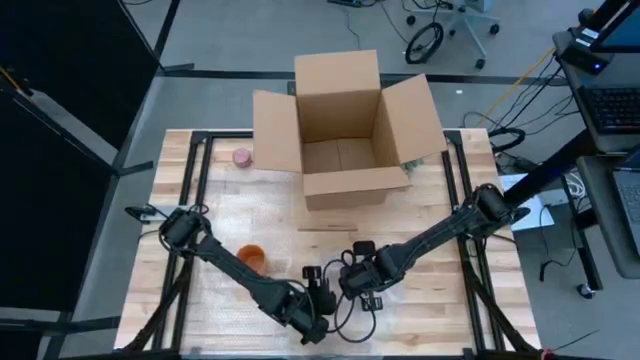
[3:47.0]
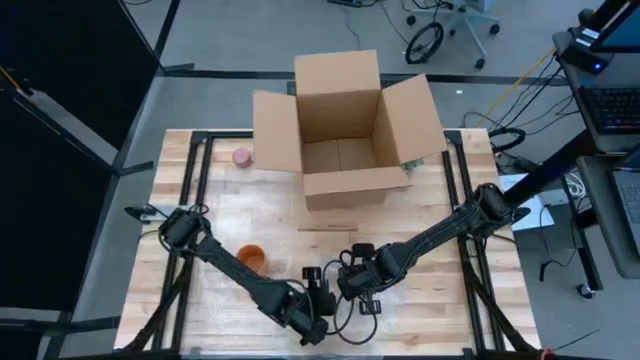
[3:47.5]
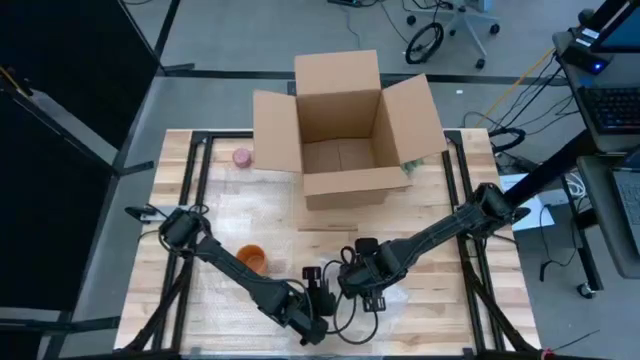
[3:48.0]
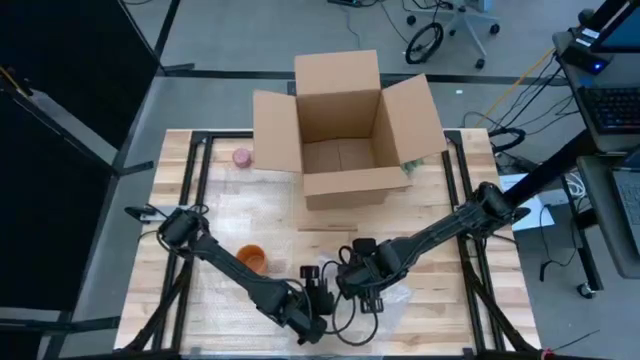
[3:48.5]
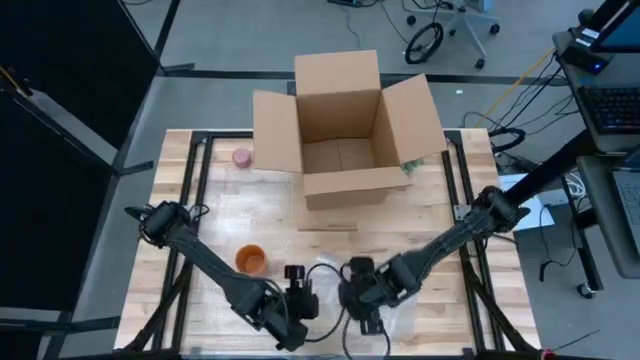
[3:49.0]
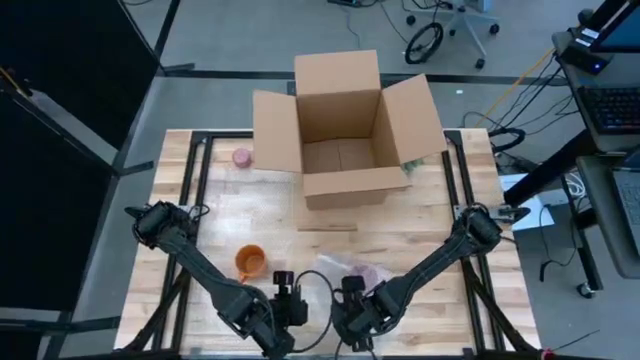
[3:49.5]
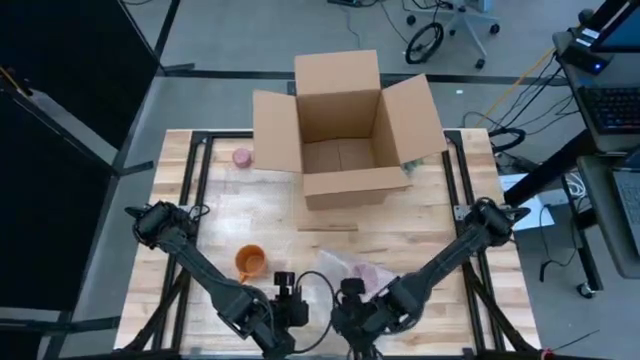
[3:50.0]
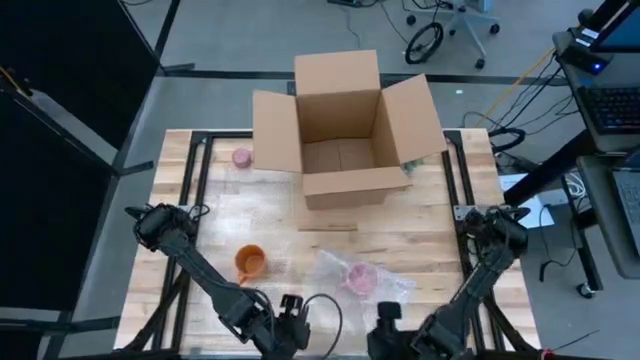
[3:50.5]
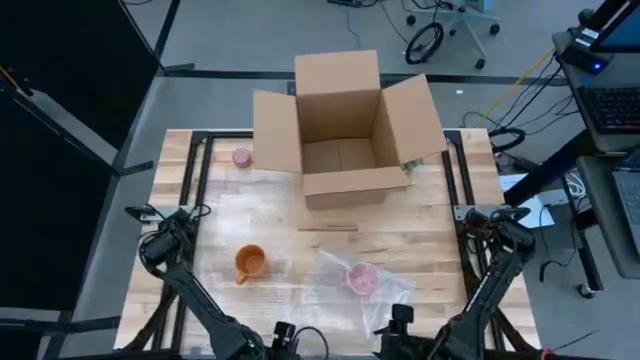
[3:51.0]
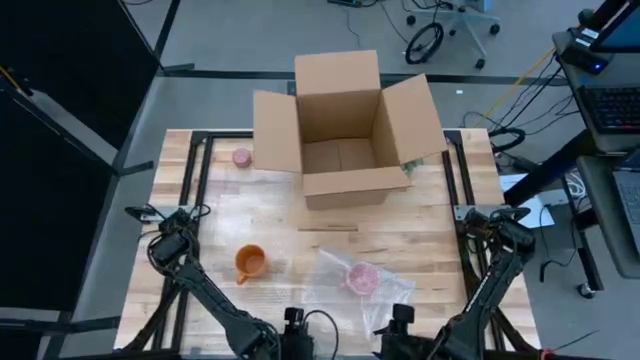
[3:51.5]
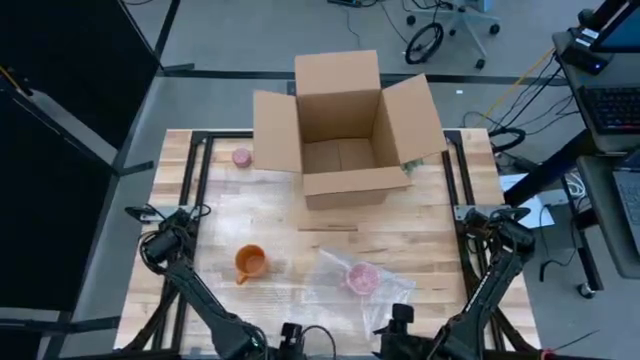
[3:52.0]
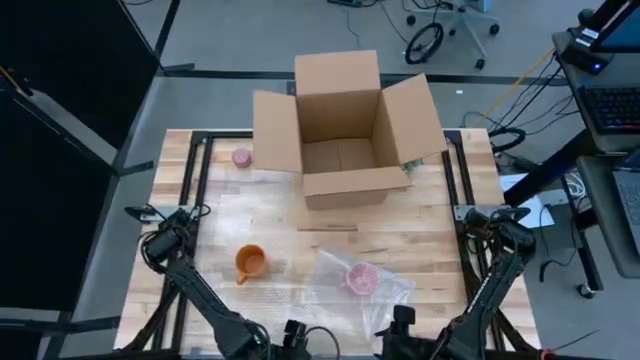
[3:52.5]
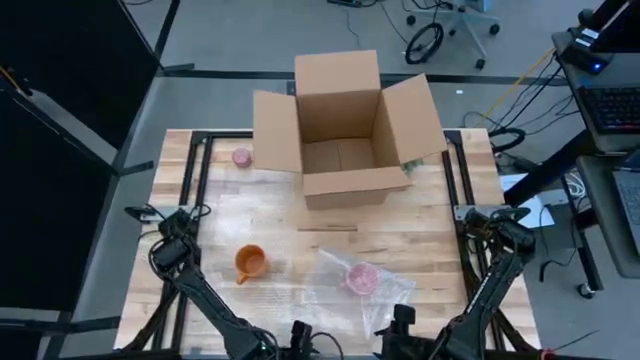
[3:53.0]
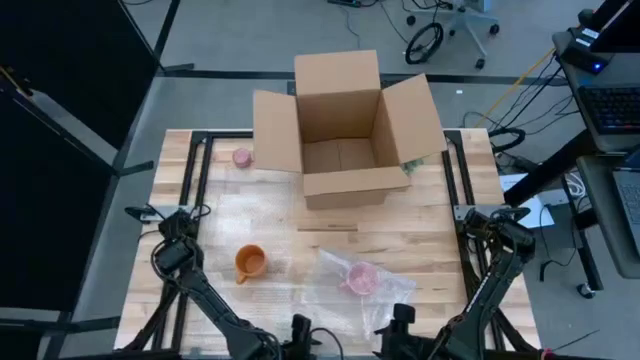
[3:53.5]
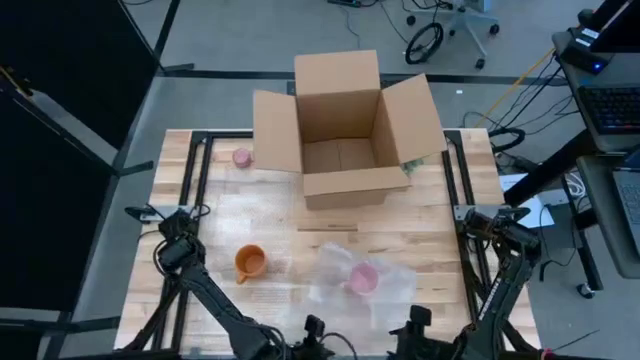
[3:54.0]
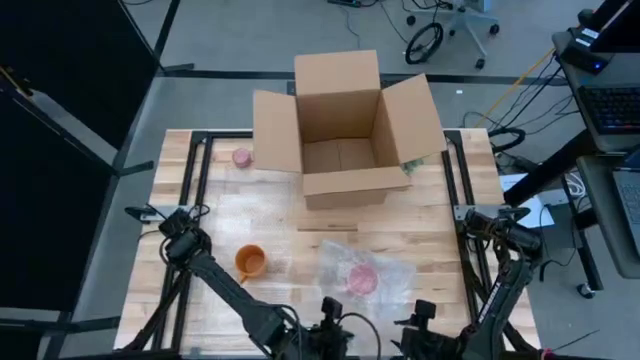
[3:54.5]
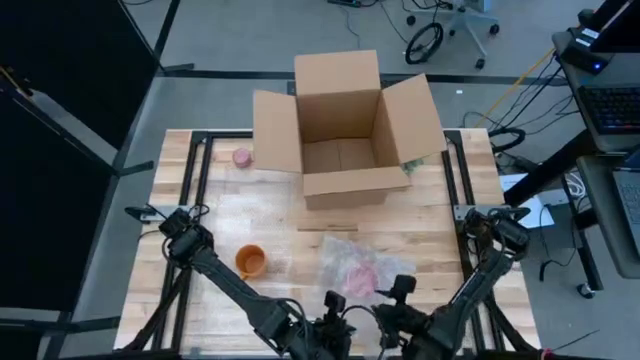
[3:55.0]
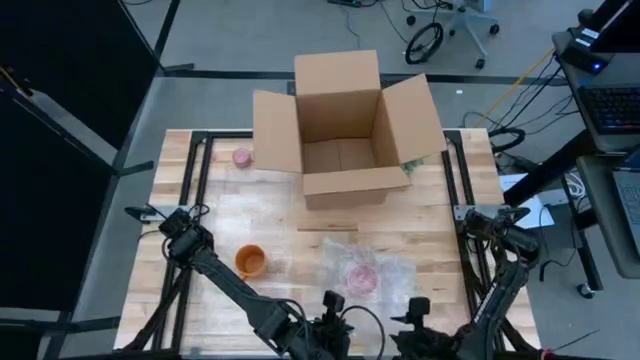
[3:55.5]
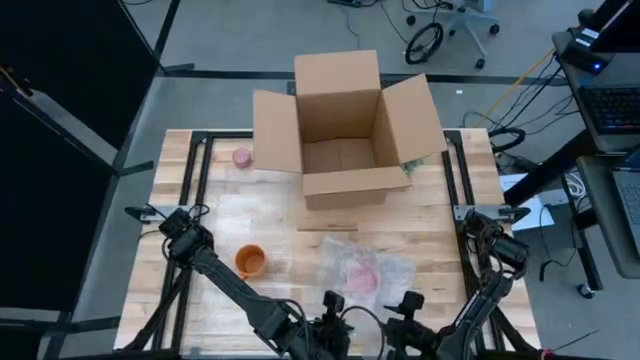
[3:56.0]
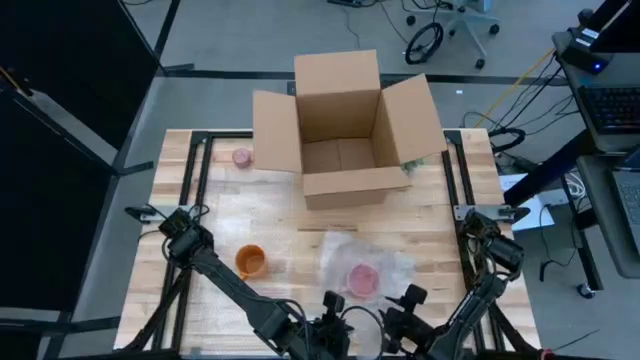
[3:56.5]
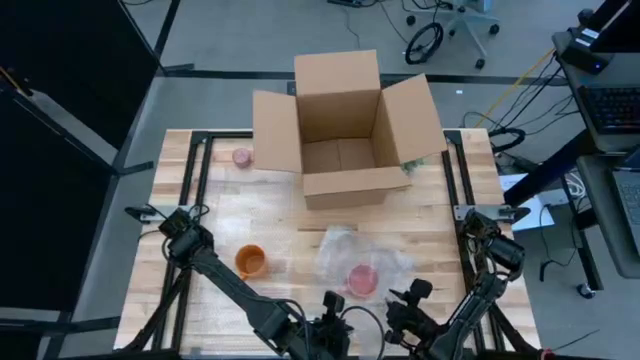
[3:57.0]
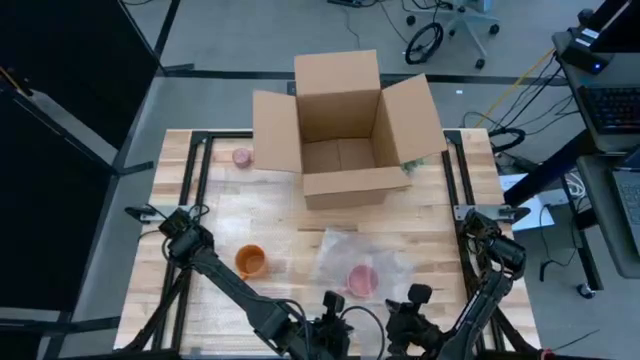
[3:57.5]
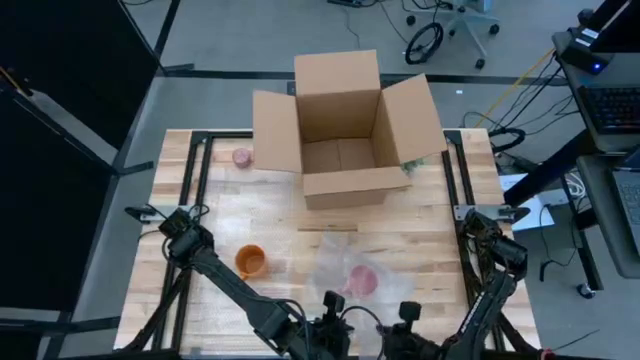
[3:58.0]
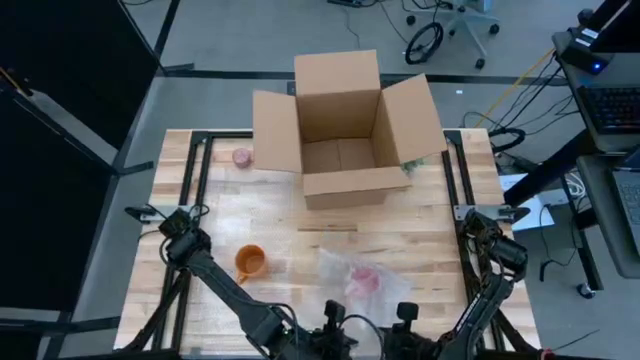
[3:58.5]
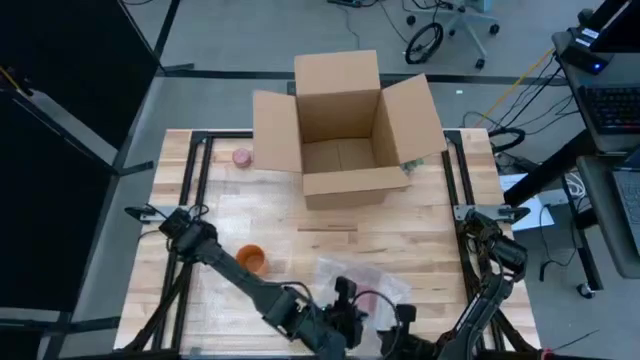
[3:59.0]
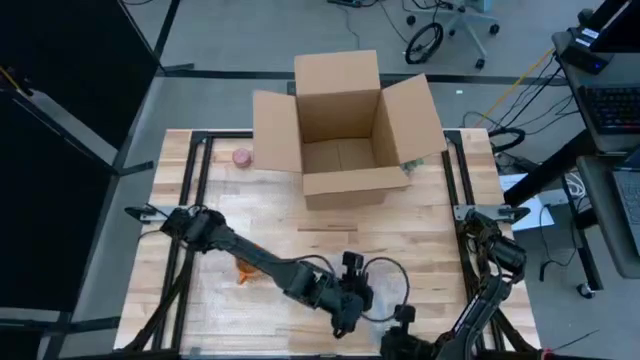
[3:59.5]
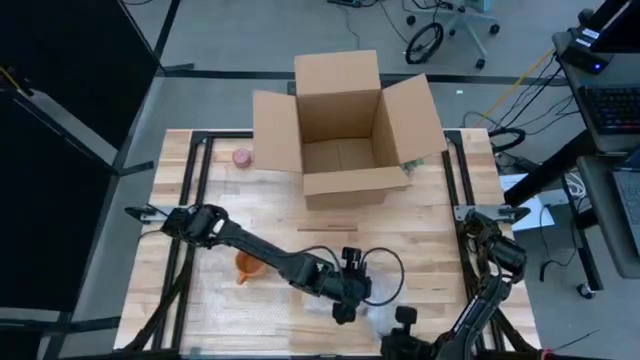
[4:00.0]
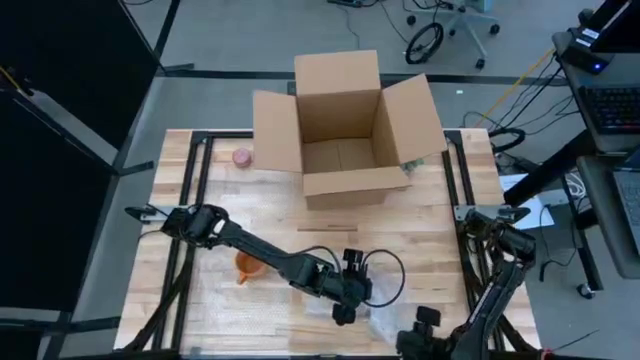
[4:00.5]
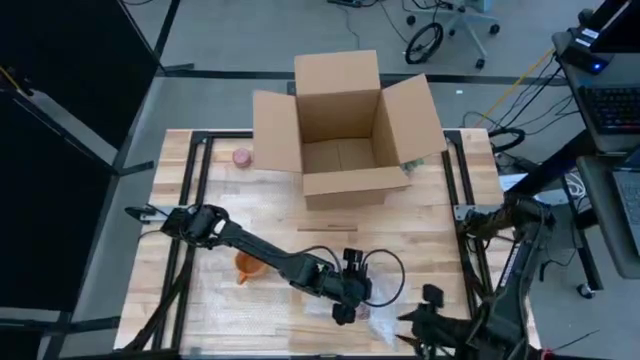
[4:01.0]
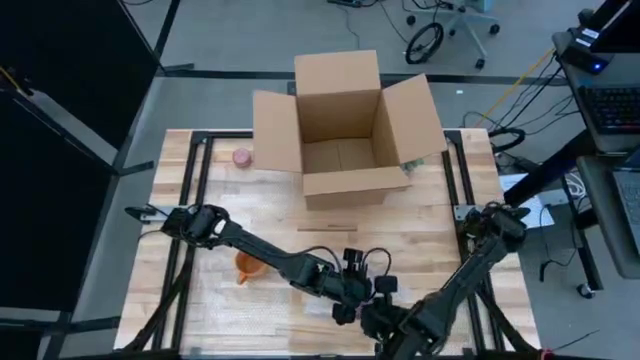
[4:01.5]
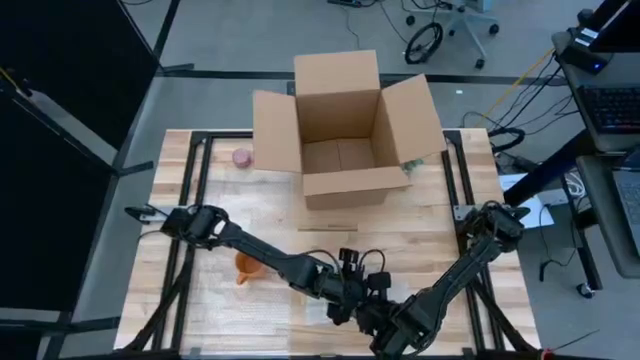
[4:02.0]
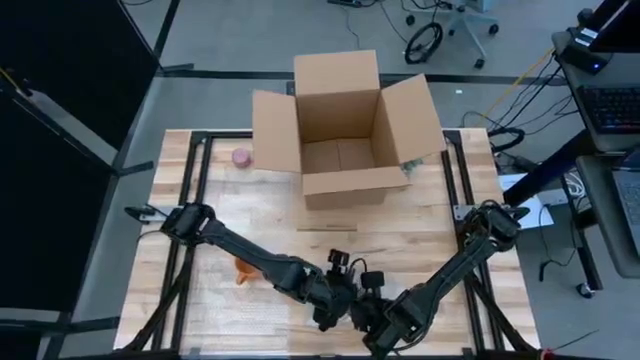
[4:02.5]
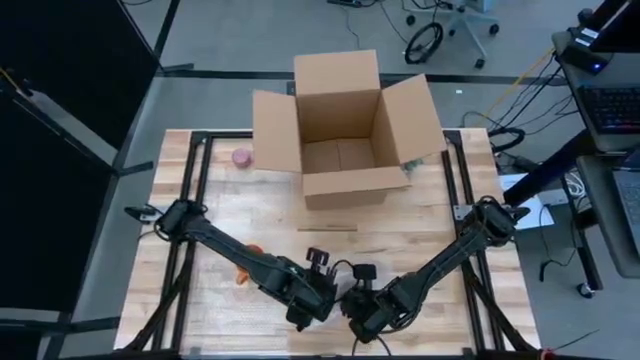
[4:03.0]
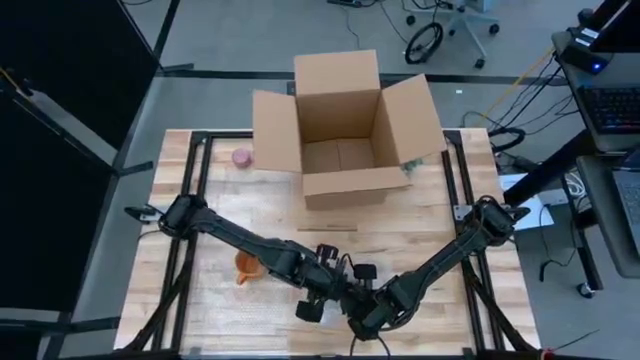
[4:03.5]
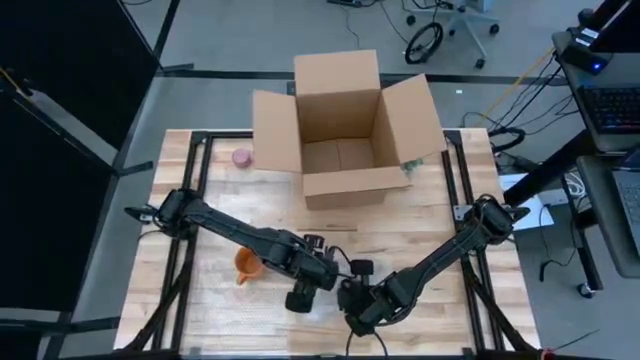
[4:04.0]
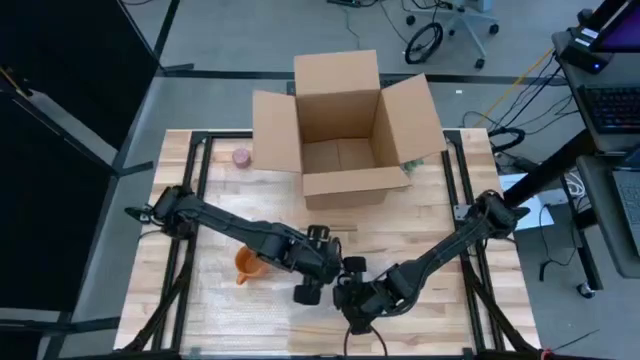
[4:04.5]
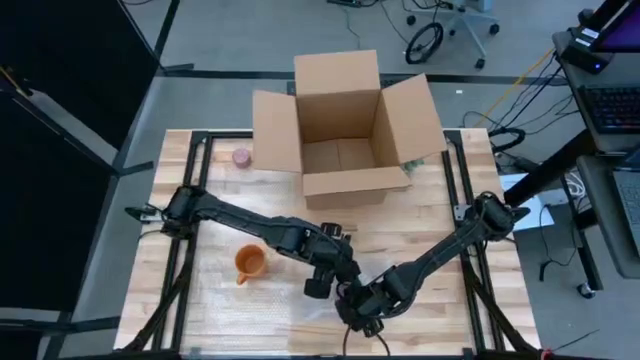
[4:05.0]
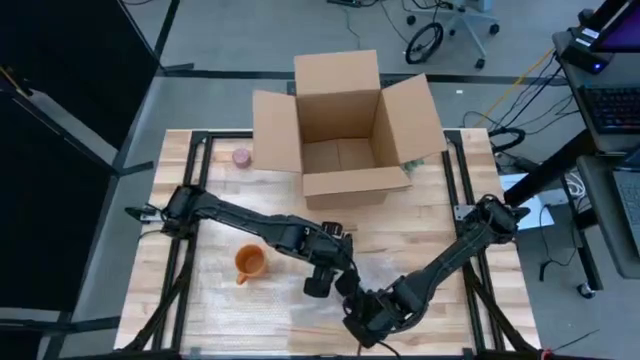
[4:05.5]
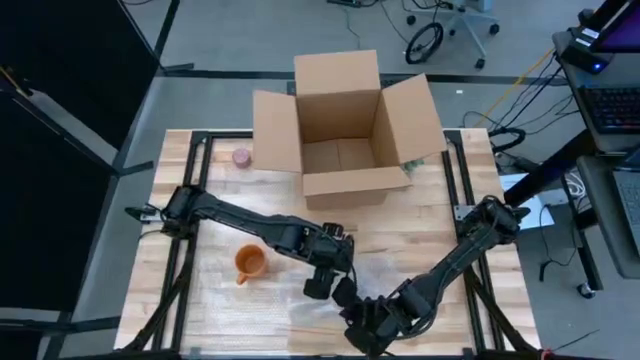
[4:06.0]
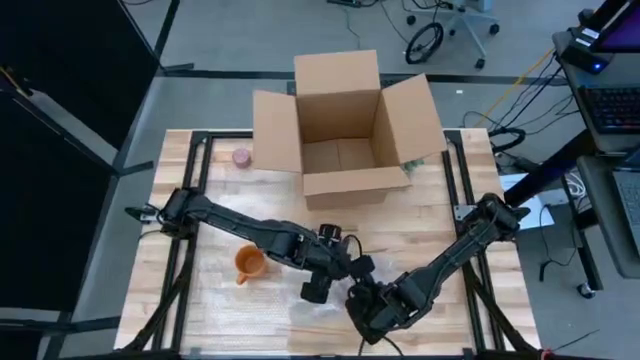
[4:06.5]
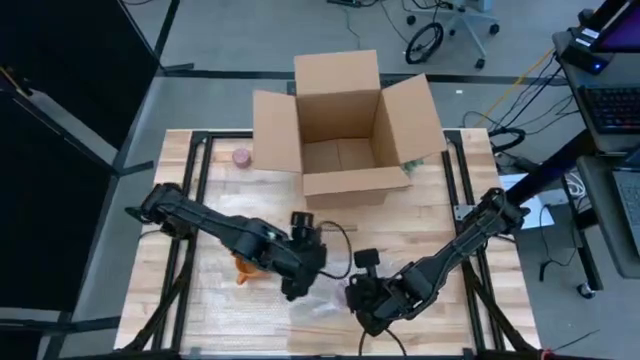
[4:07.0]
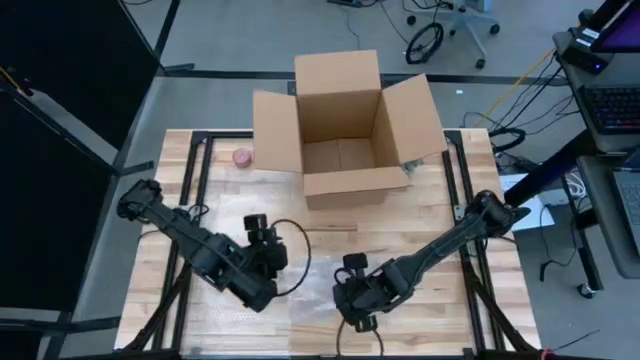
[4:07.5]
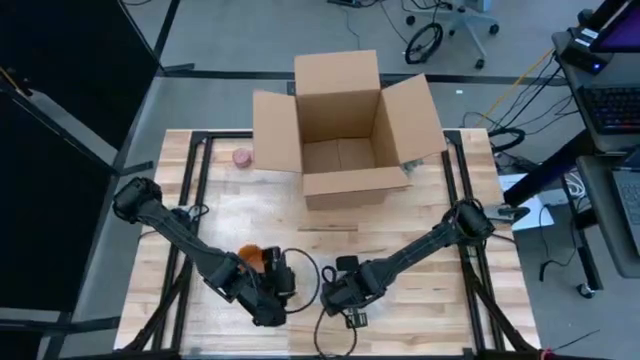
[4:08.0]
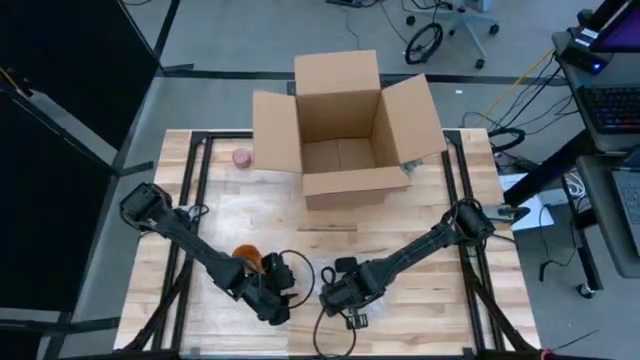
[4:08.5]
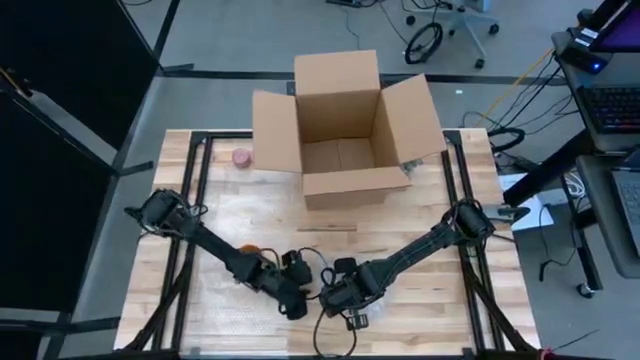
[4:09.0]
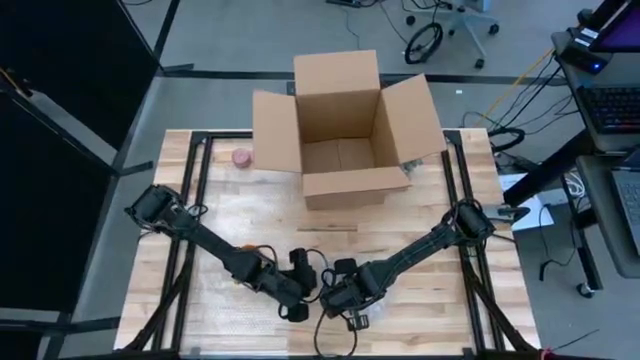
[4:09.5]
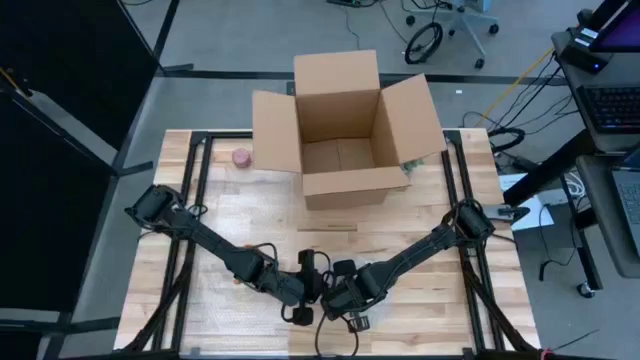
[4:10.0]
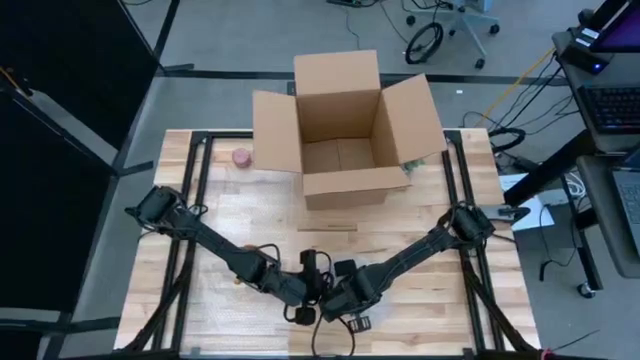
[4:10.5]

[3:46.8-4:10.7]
Task: wrap mug
Wrap the pink cup with the bubble wrap
